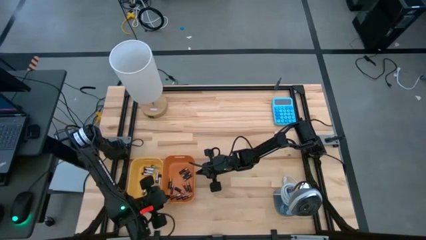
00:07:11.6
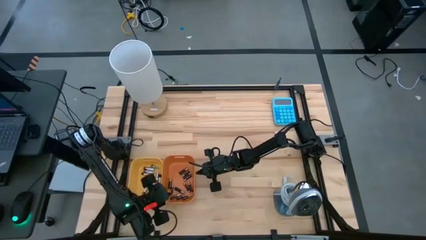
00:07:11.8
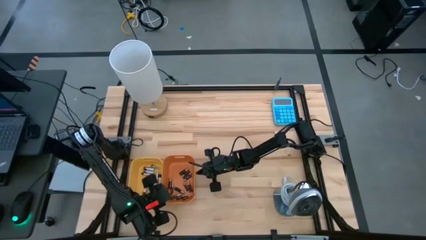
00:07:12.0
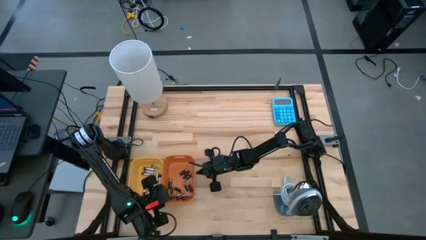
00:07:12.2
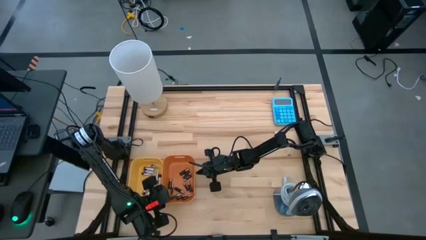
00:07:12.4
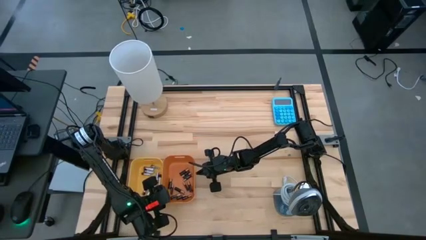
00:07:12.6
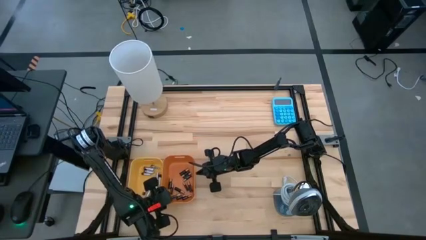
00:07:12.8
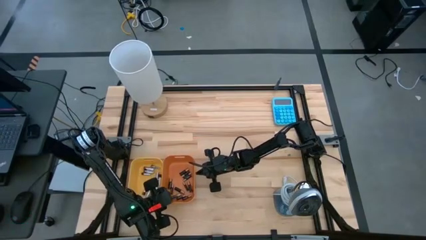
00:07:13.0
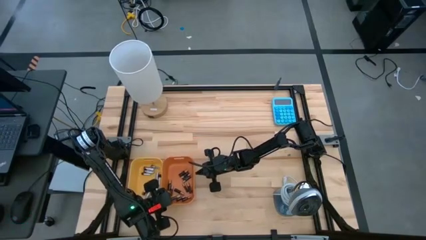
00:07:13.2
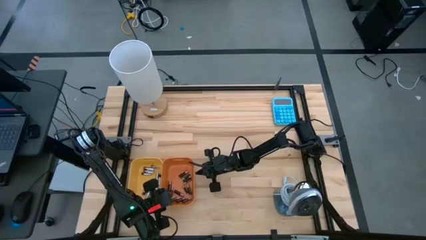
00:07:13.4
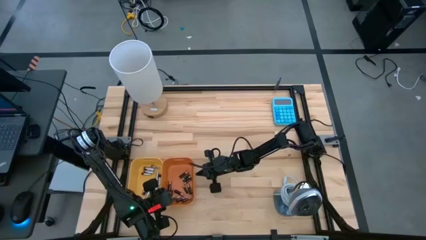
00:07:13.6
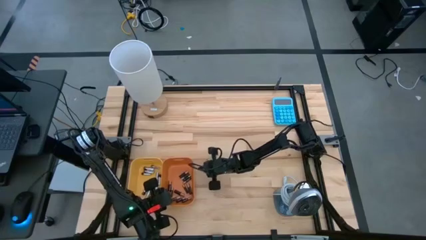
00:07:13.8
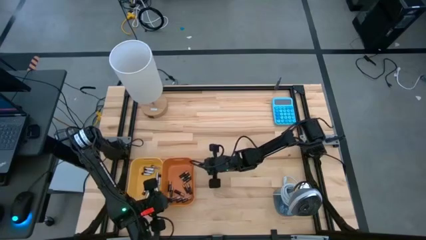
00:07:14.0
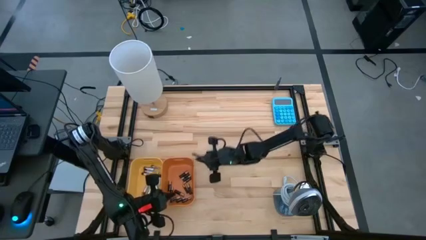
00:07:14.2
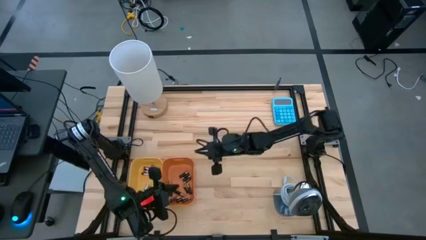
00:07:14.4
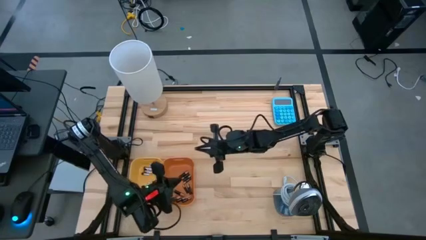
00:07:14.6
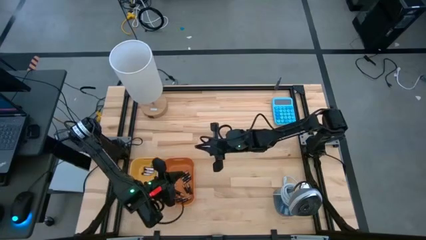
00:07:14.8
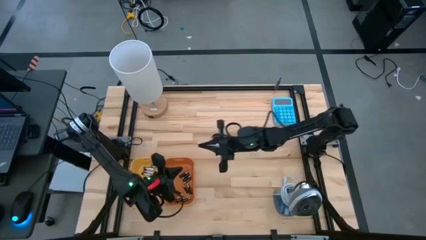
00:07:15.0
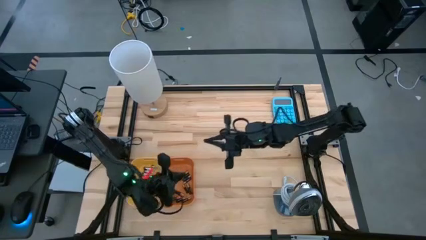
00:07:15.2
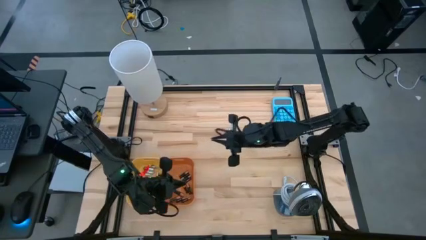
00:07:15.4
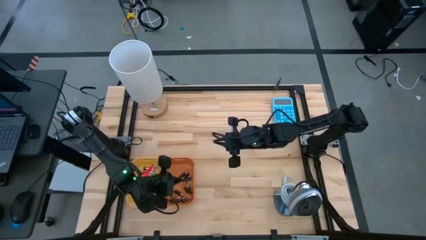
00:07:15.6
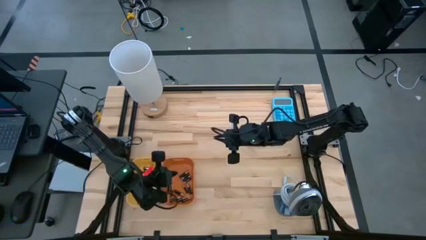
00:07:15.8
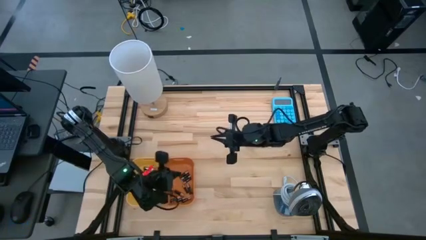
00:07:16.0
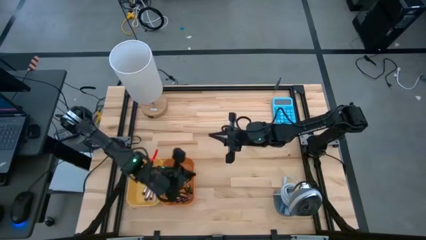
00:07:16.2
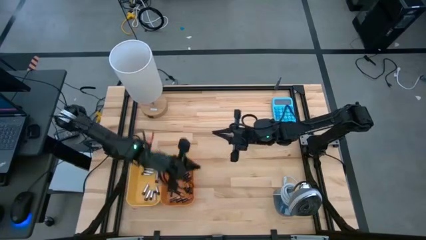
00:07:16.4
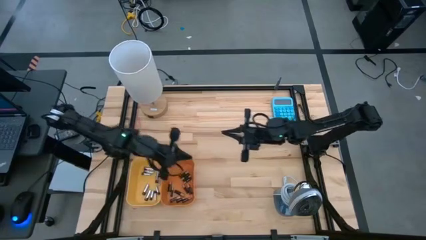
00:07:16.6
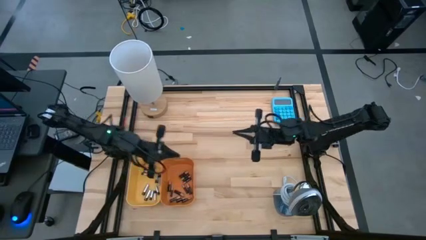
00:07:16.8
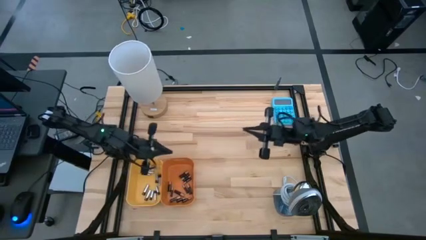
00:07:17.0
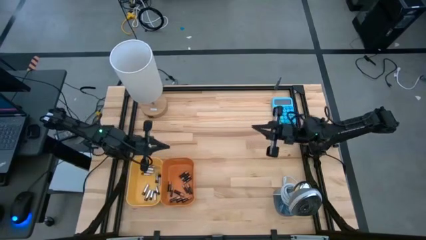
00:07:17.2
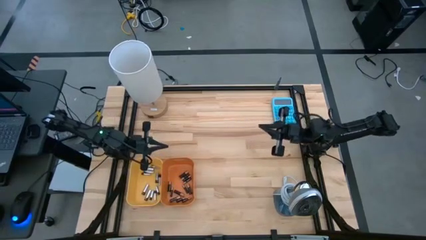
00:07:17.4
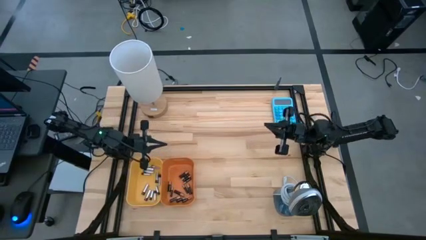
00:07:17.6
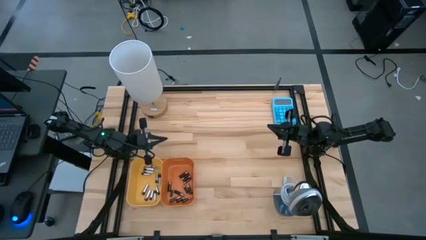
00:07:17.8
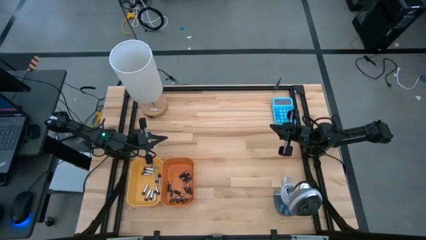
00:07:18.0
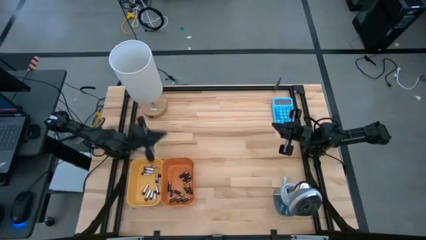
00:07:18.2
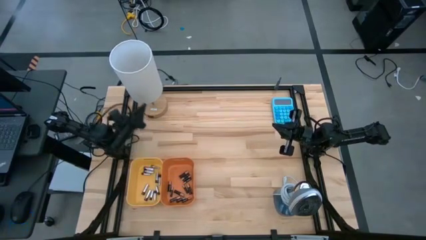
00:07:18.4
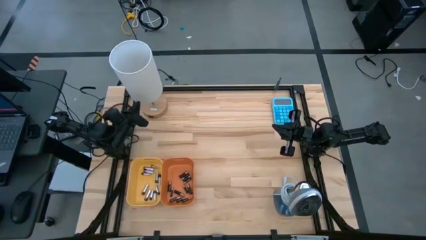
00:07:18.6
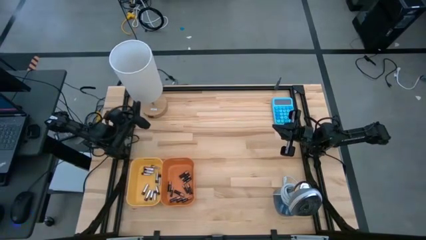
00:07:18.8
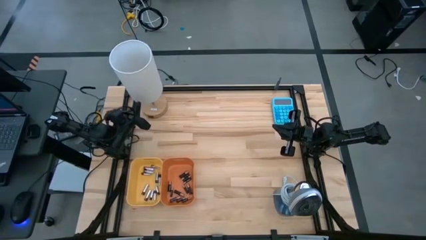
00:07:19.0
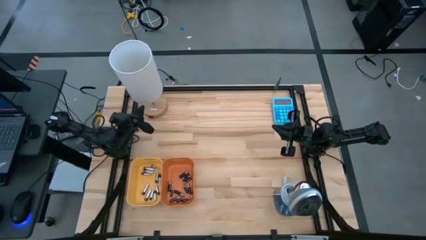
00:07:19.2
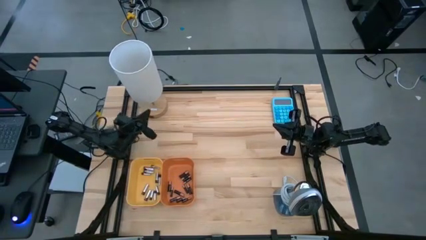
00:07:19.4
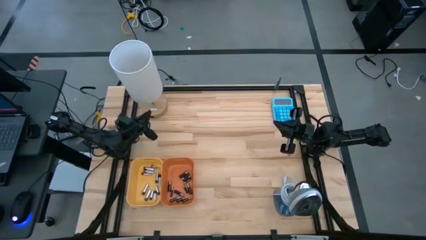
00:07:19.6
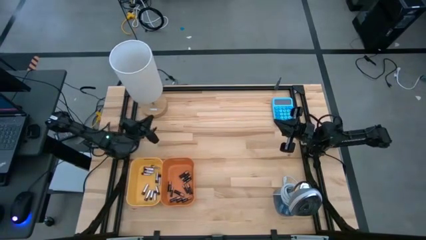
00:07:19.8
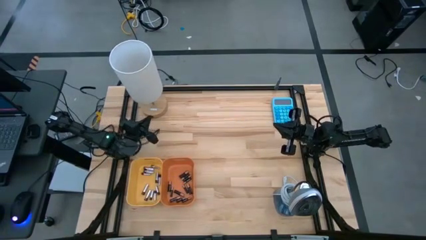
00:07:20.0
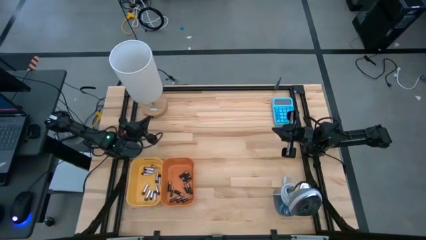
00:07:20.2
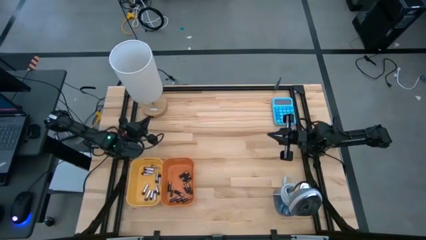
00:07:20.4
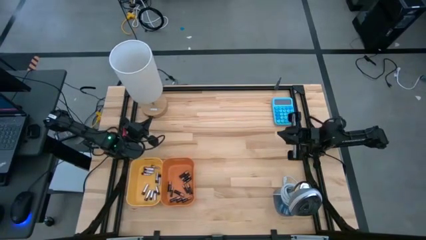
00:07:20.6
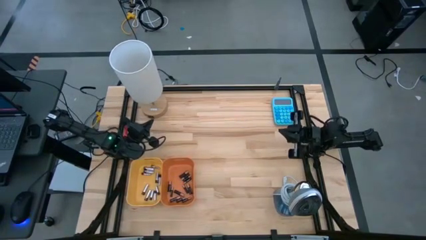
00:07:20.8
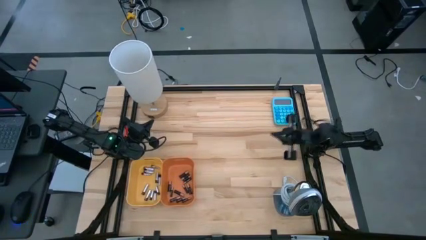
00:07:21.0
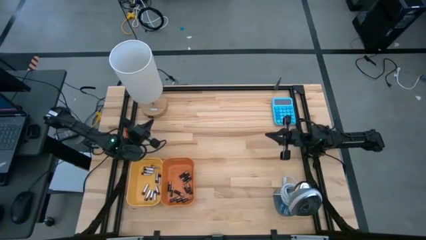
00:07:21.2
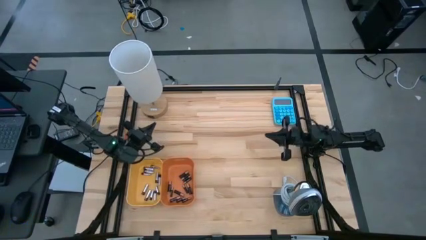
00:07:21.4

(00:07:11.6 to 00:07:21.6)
Task: Sort batteries
Return to Home Position
